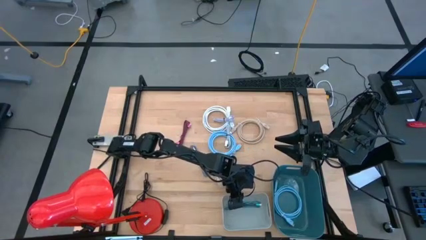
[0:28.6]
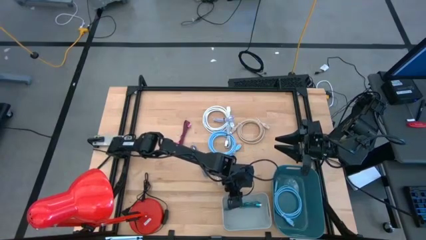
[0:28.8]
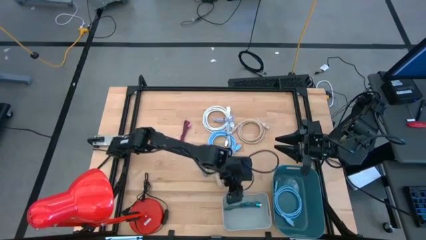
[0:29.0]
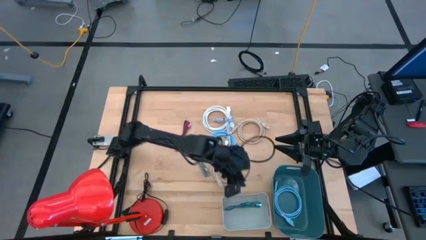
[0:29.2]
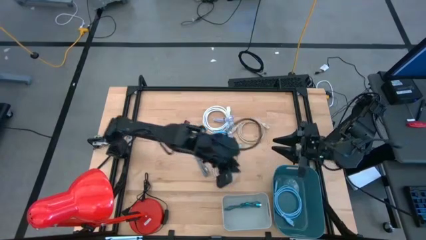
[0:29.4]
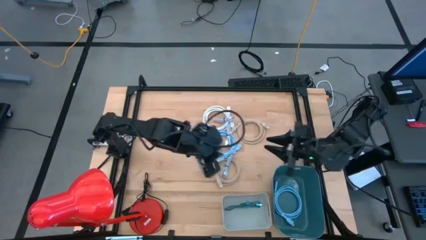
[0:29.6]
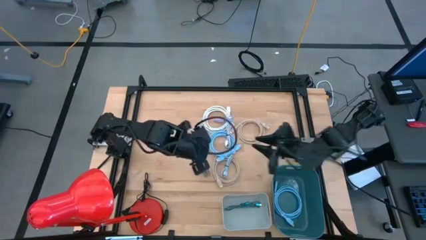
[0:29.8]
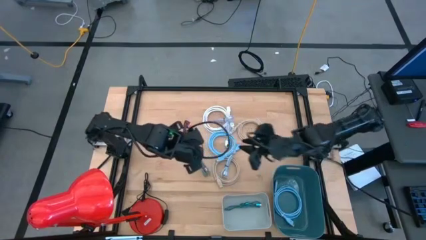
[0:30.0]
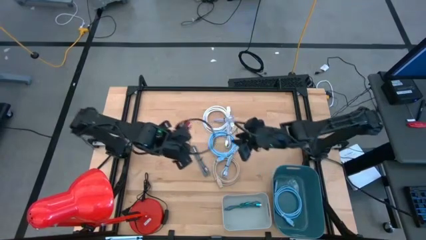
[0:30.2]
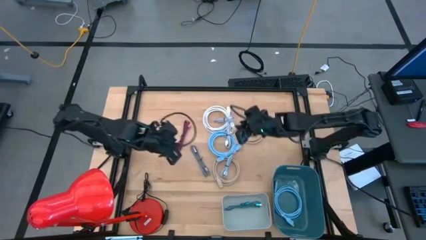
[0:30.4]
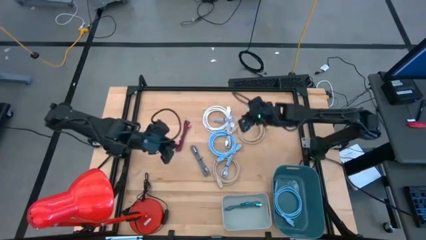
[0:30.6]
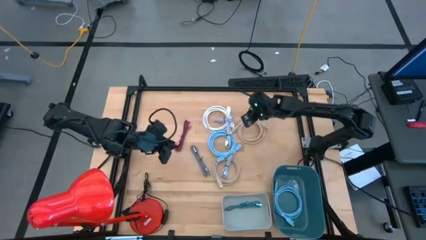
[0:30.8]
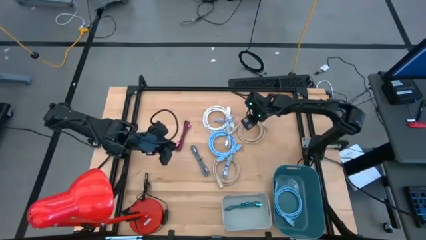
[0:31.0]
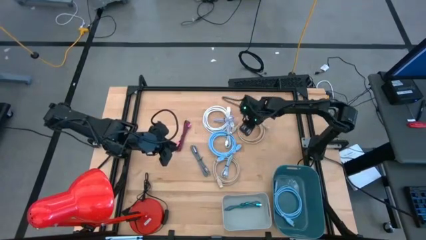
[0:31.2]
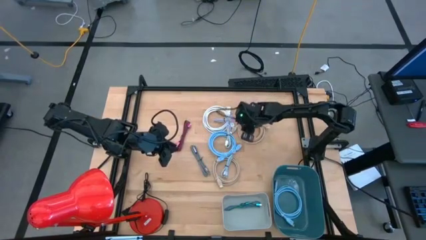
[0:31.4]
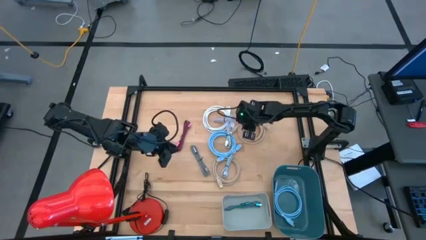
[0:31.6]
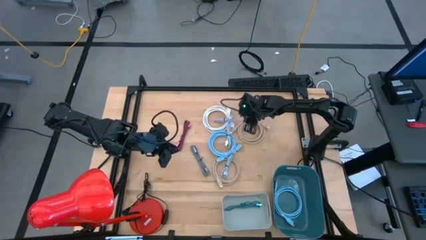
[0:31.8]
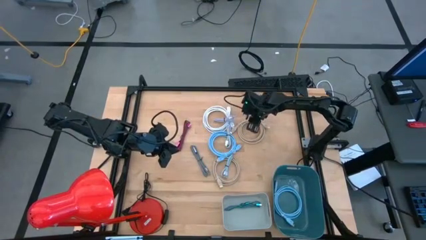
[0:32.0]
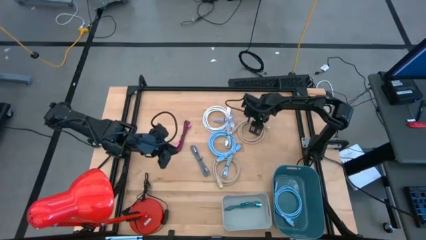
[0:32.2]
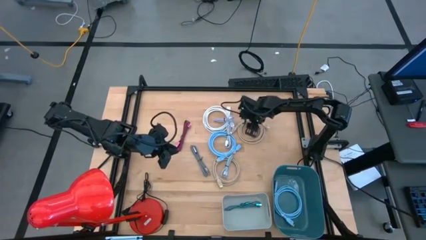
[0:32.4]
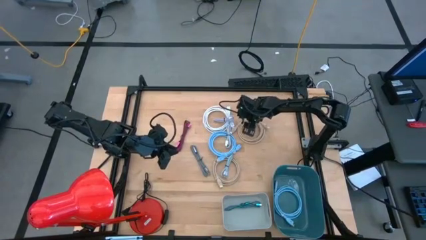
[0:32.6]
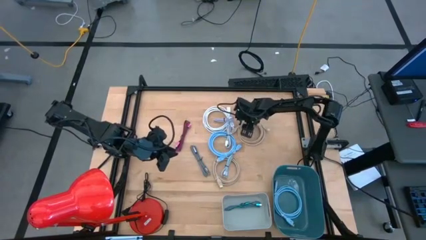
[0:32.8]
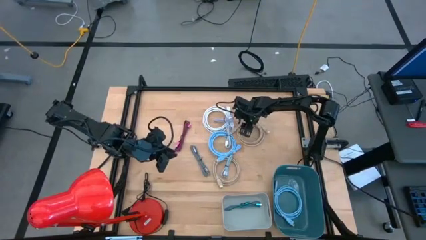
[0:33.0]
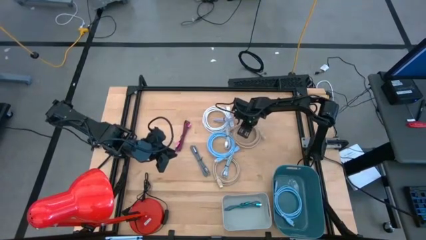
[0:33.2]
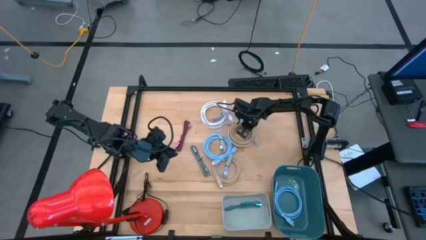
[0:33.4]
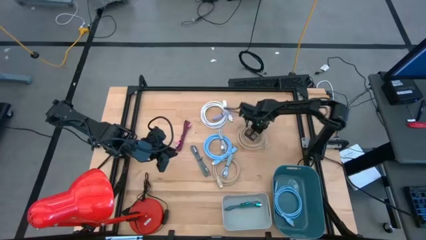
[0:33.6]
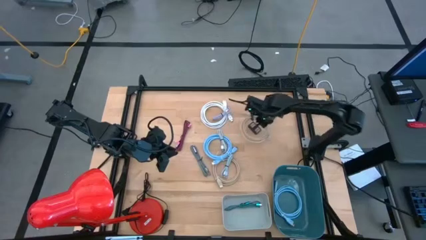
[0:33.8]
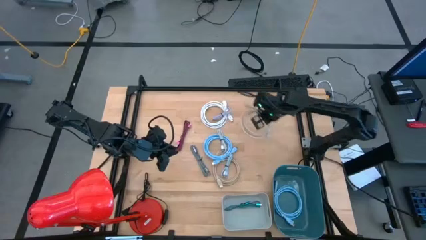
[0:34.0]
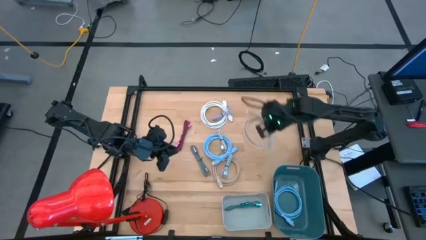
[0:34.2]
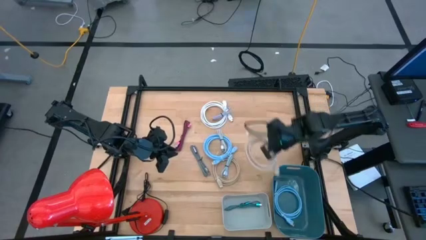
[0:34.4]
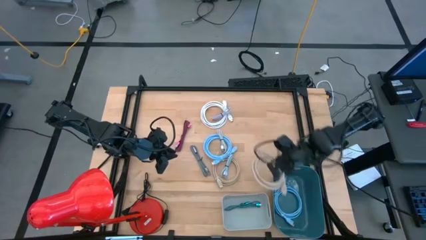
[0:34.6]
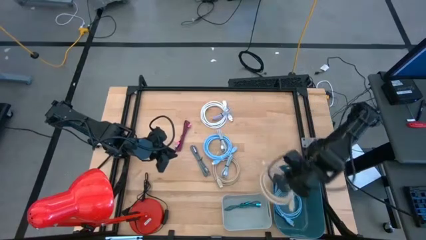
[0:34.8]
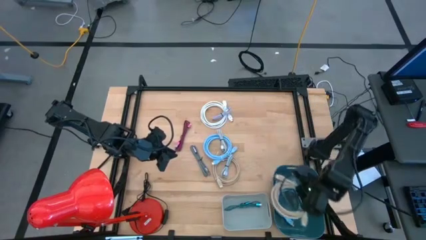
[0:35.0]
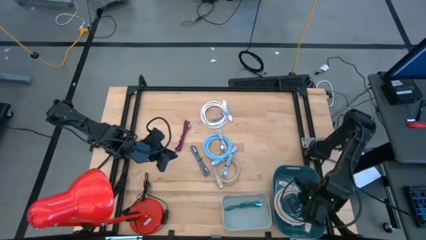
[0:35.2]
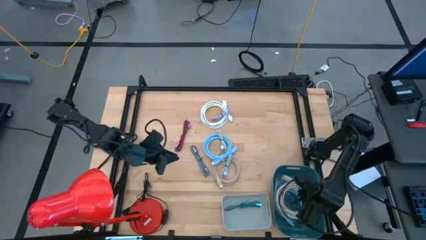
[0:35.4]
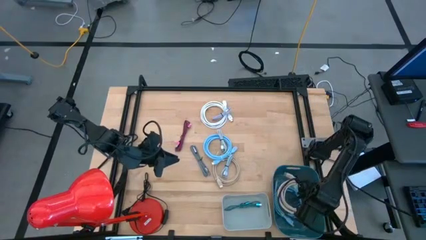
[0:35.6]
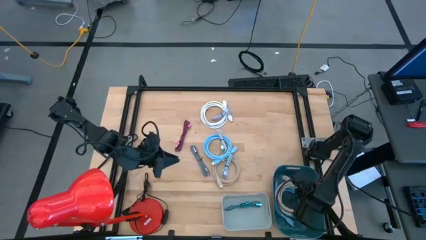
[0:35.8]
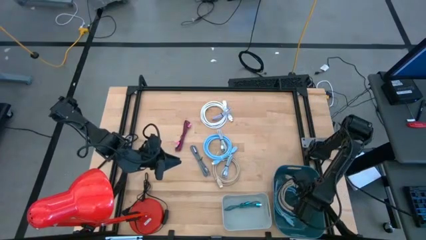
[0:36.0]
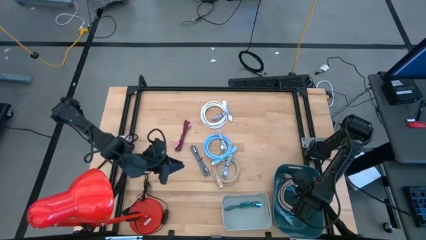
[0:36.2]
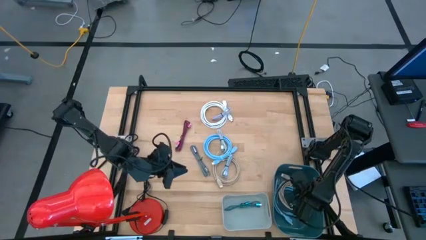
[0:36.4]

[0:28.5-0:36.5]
Task: Pick & Place USB Port
Put the top brown HDMI cable into the blue bin

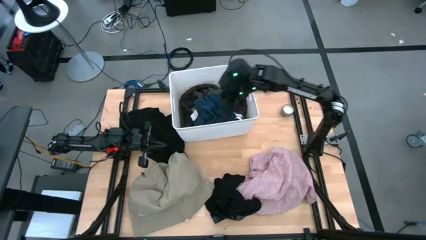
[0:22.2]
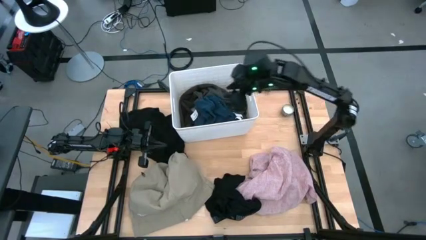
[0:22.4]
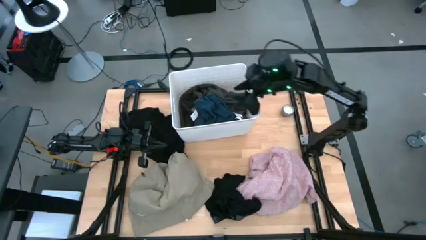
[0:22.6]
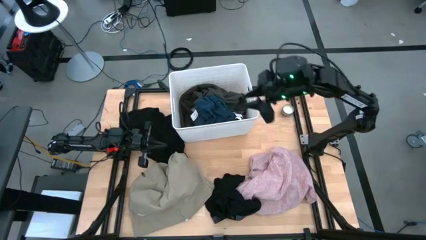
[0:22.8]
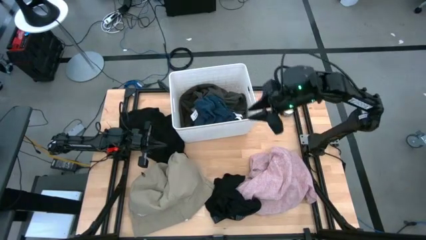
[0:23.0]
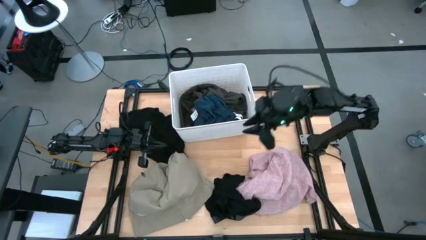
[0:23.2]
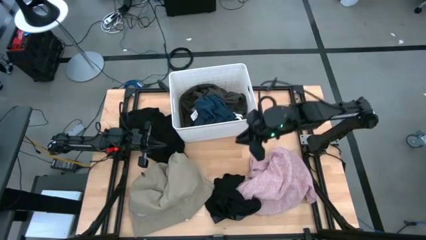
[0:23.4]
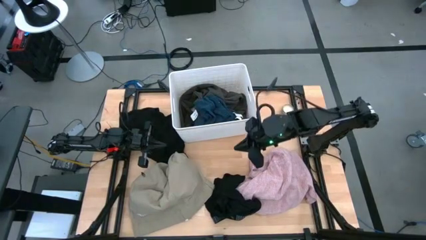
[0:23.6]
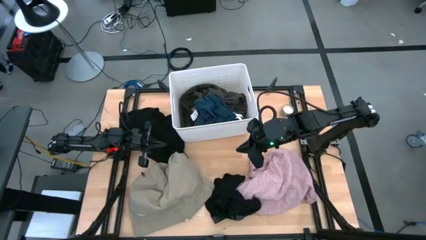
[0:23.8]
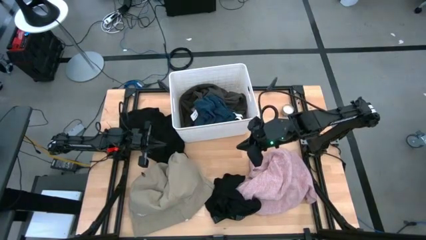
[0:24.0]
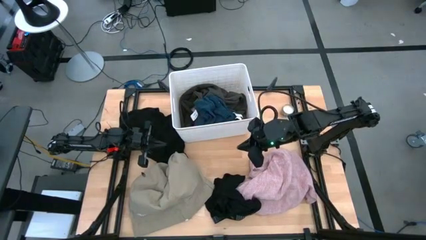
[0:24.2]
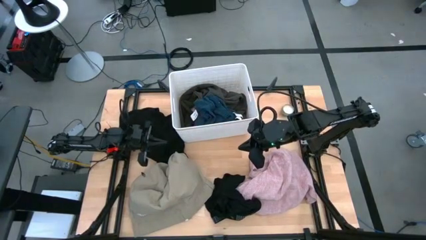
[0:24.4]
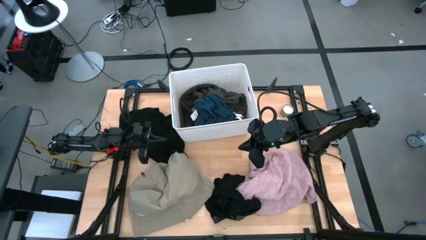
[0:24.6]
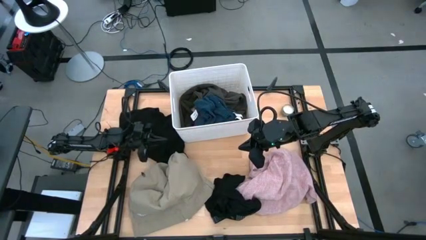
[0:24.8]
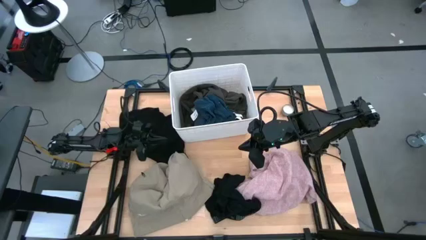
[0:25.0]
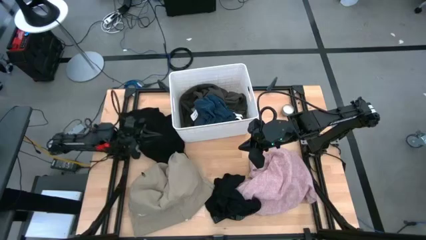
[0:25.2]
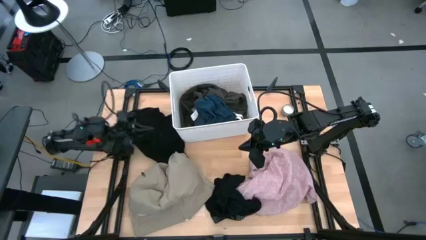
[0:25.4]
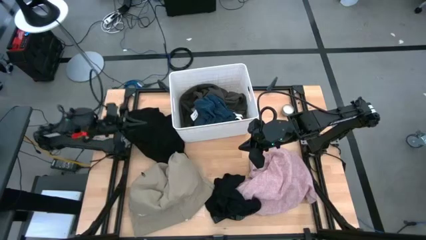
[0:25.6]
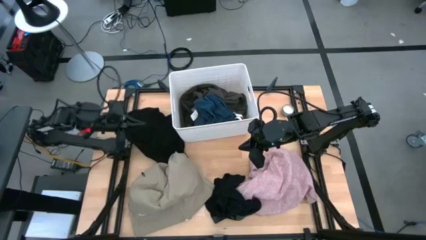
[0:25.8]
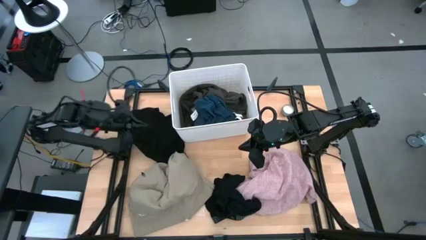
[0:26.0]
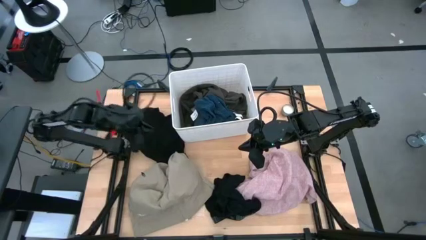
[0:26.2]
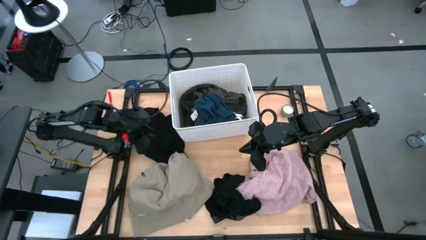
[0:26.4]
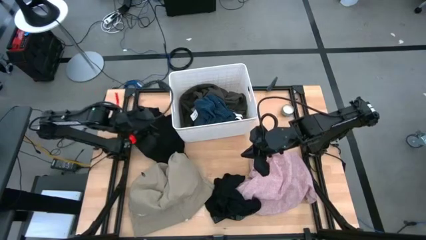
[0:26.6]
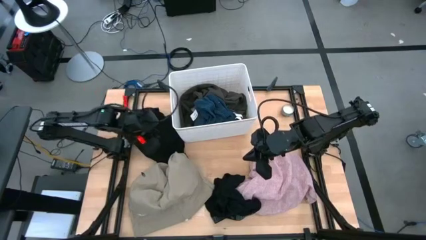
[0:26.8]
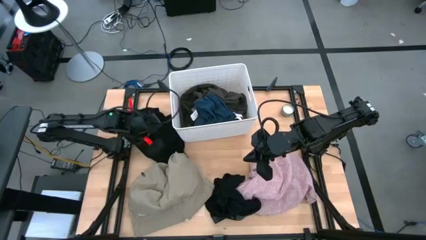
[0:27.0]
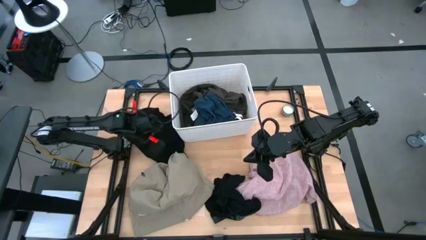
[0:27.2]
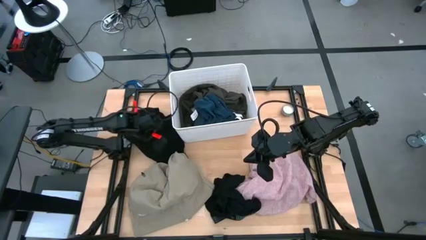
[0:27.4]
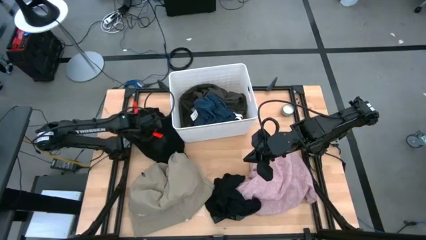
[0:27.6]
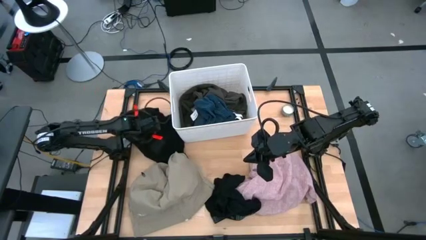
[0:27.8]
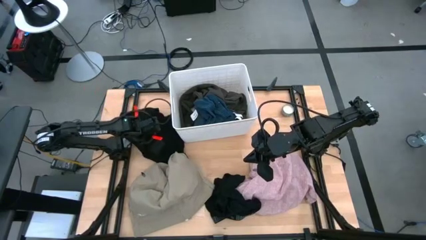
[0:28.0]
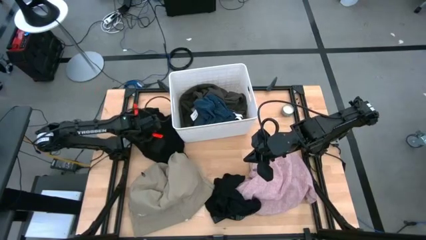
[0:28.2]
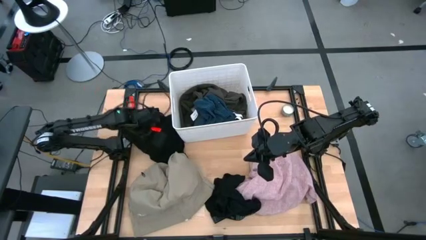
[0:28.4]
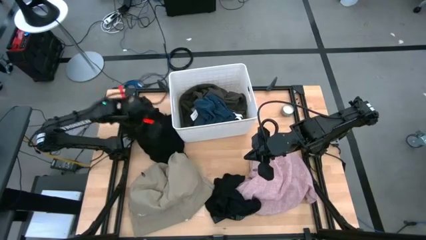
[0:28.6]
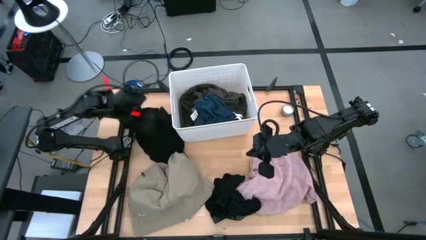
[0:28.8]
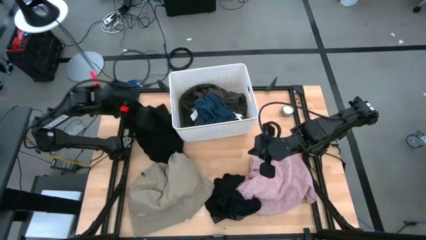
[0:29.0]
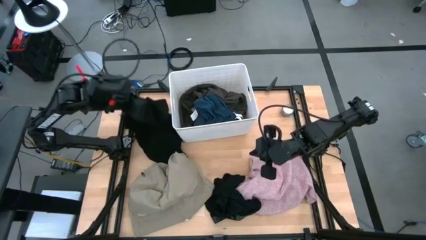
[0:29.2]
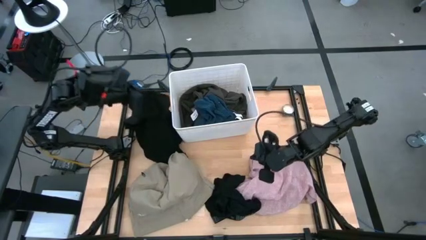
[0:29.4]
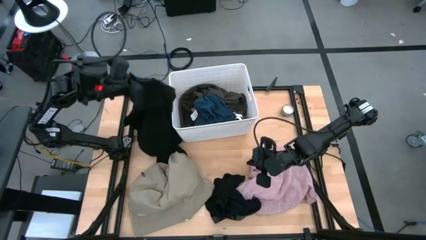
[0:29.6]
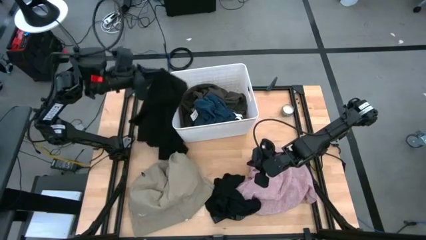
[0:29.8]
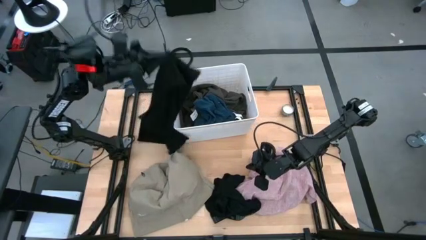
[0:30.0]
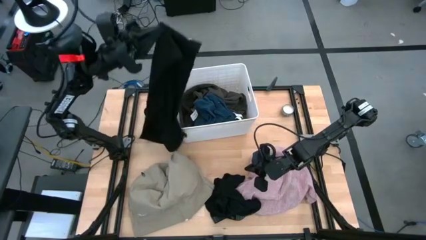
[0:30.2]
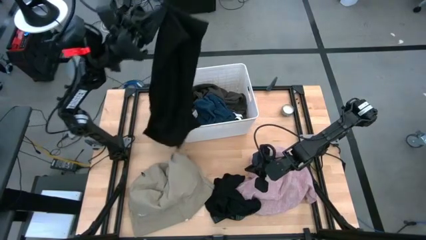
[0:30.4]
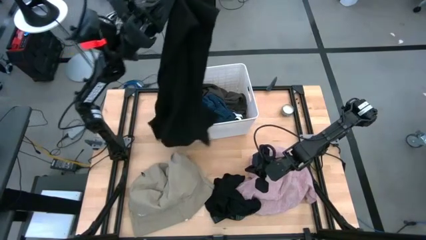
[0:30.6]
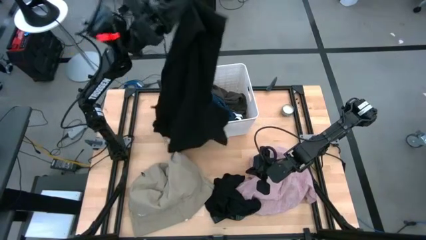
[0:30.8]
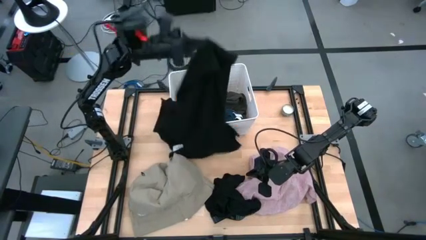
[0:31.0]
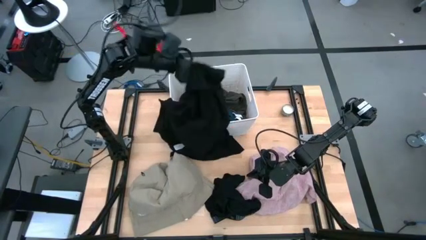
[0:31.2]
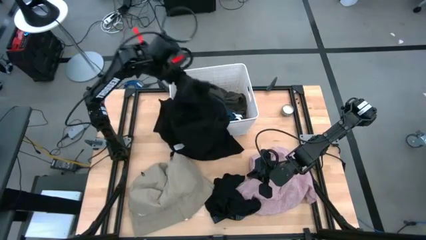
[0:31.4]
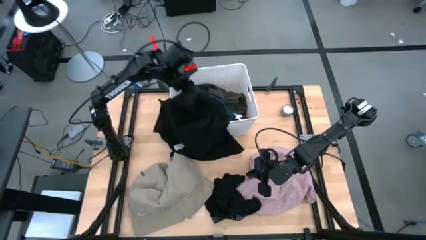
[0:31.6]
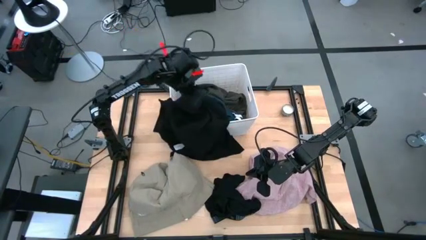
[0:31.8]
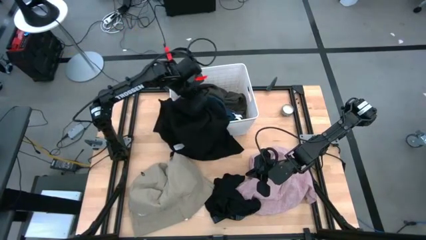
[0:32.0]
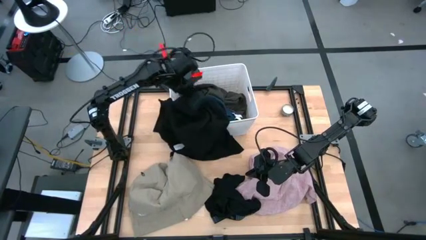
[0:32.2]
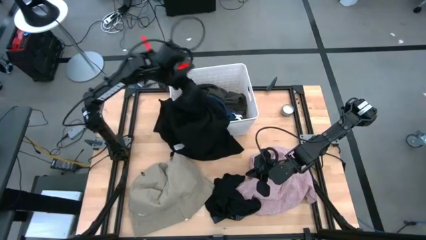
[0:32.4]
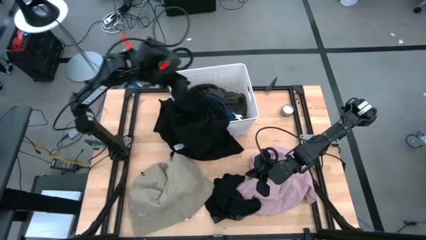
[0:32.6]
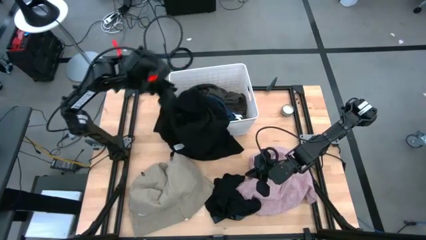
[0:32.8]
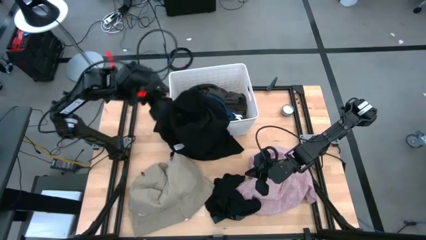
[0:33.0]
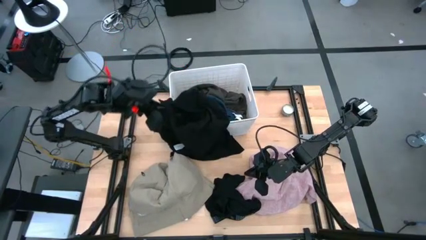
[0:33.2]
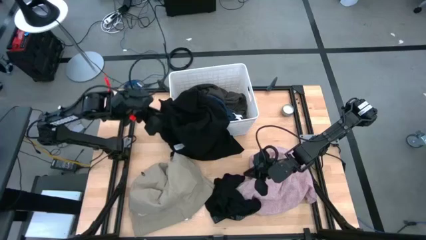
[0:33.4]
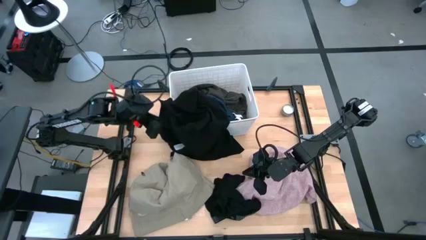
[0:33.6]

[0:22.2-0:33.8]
Task: Sort clothes
Put the black shirt into the white laundry bin
